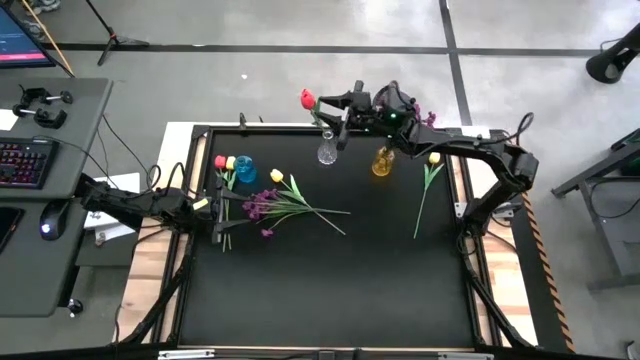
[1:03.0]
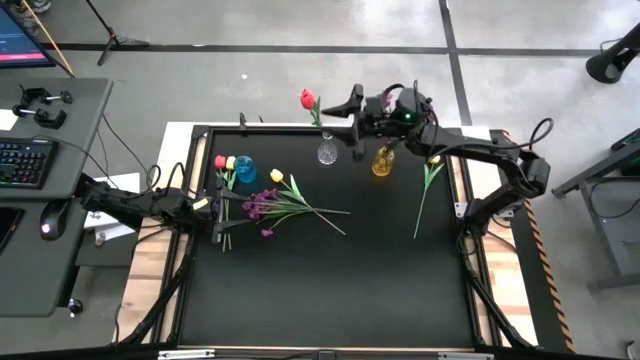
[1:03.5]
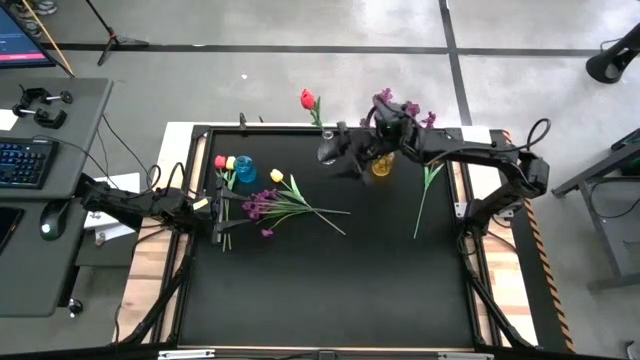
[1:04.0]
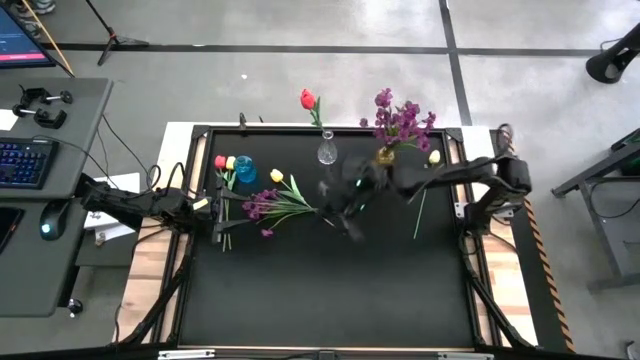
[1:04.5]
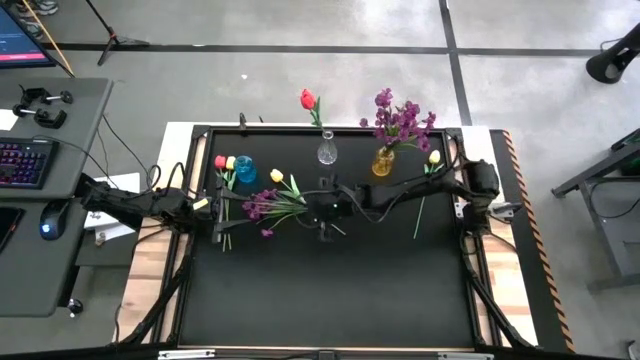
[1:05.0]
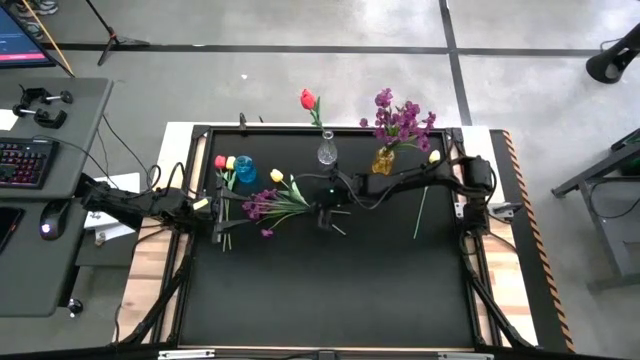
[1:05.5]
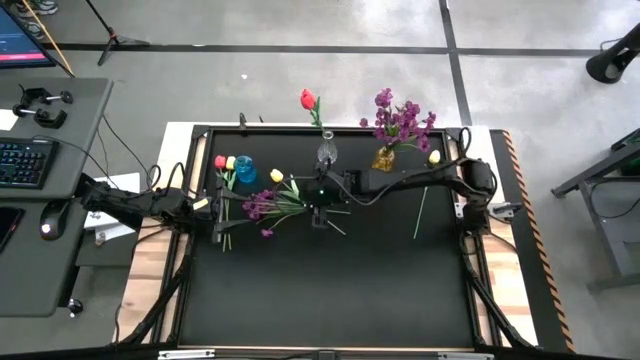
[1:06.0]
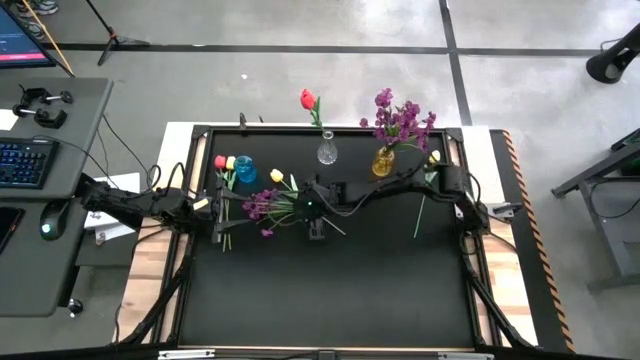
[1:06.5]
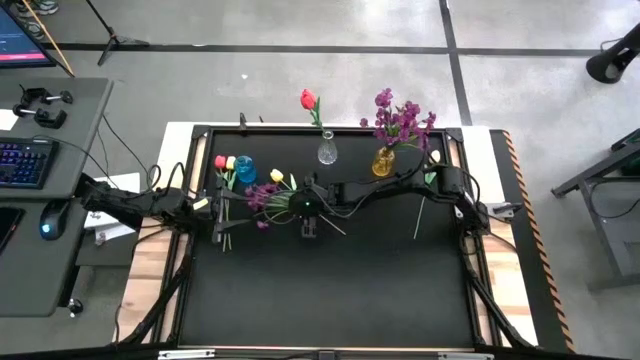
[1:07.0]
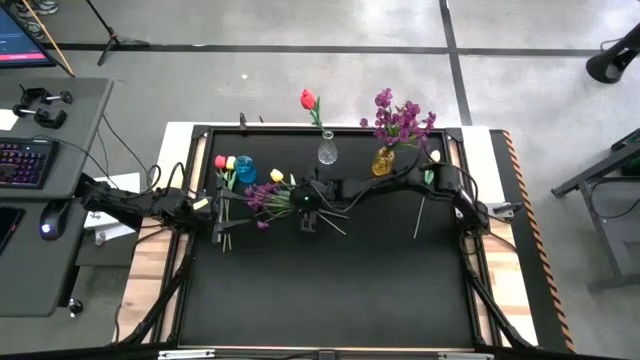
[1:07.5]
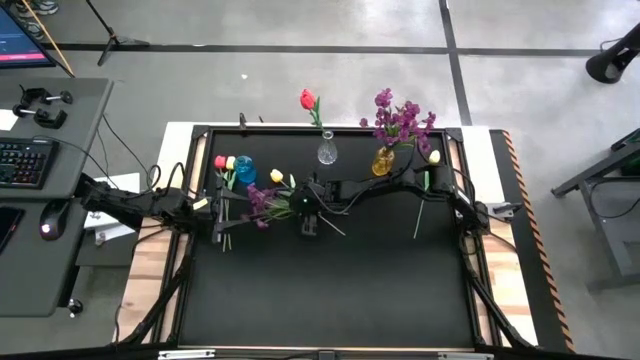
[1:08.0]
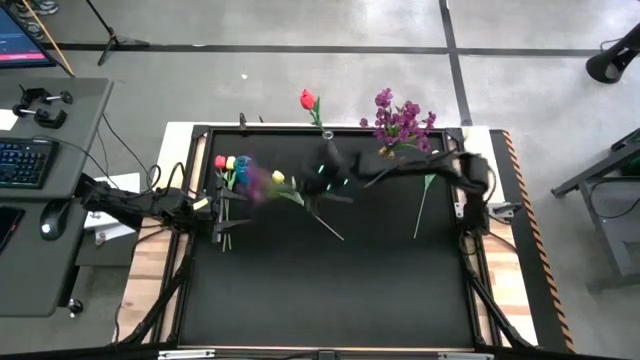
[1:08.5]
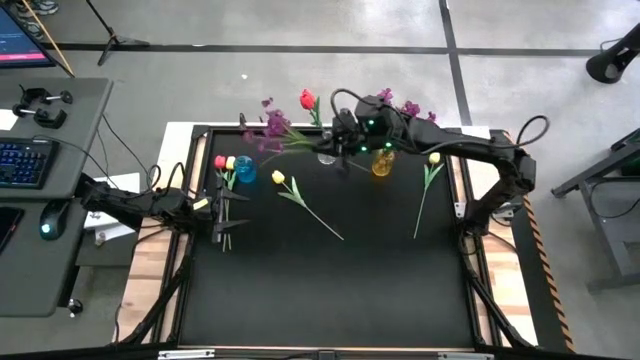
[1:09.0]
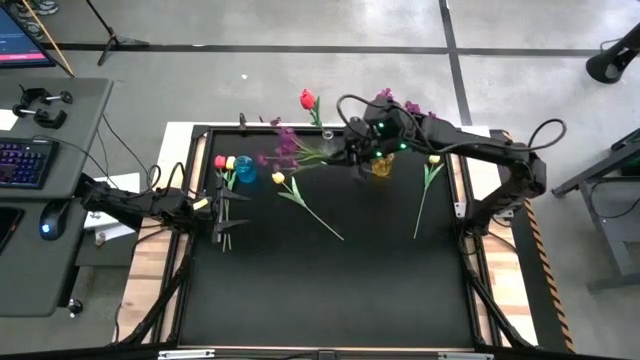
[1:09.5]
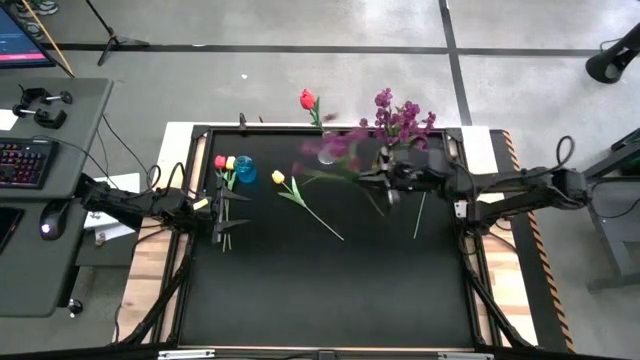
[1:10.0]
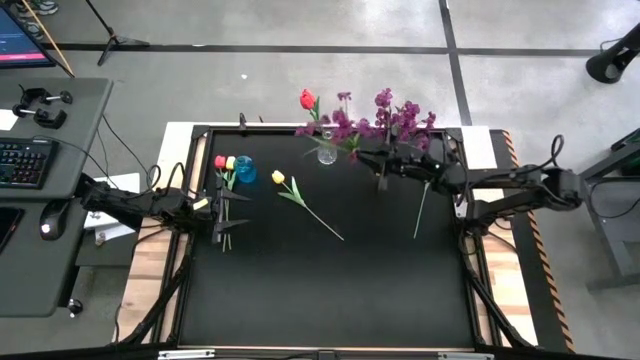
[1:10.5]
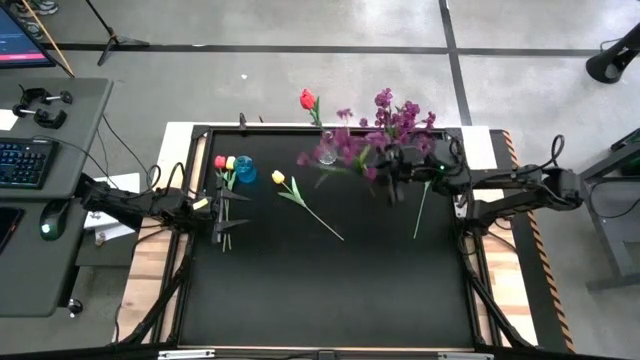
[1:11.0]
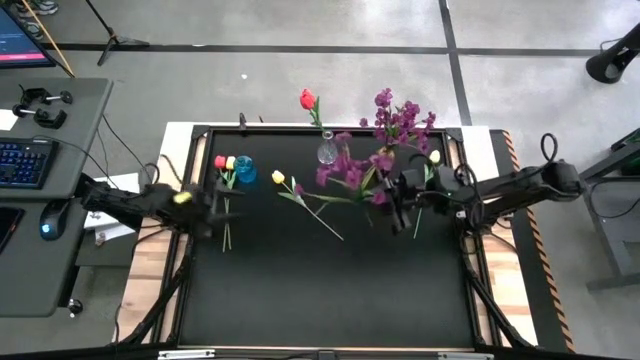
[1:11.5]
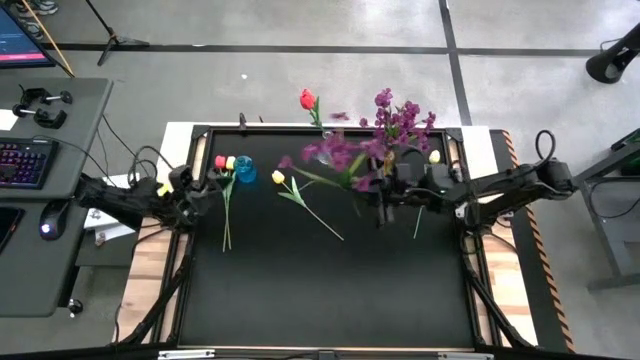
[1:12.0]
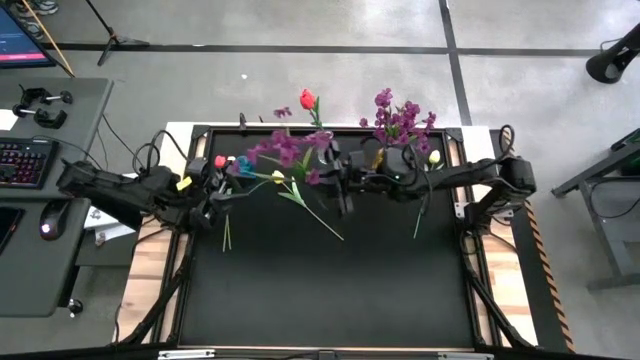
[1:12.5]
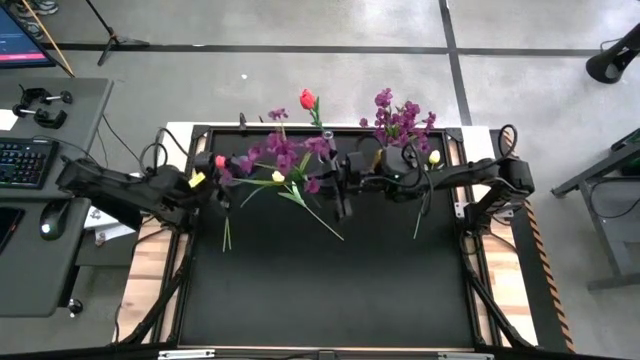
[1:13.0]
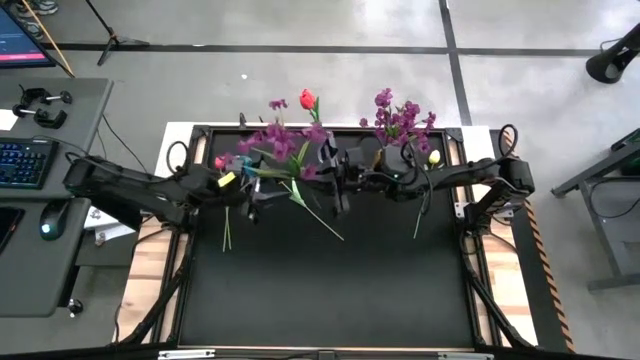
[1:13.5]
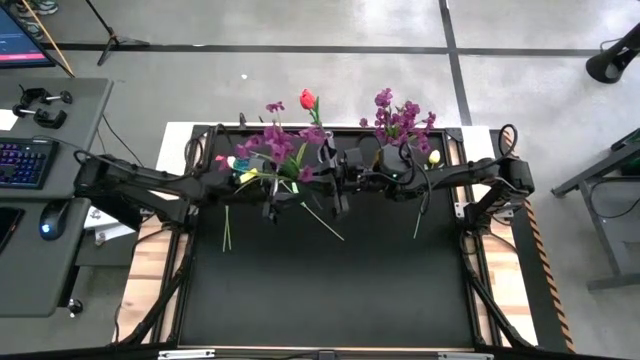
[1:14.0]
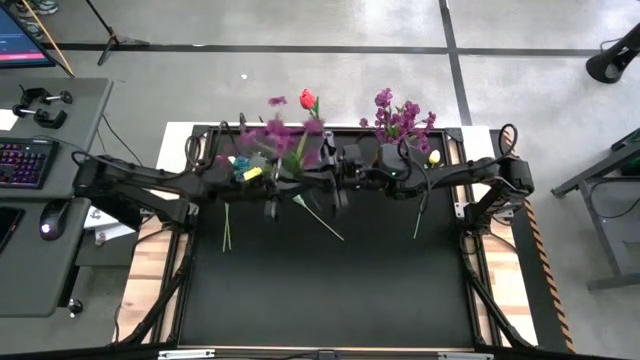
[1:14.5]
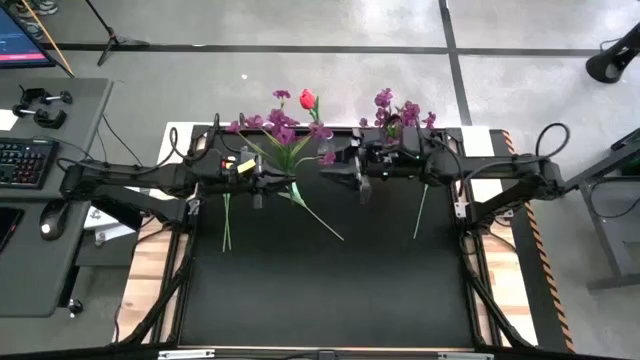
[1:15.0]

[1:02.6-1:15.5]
Task: Sort flowers into vase by color
Put the purple flower into the yellow vase

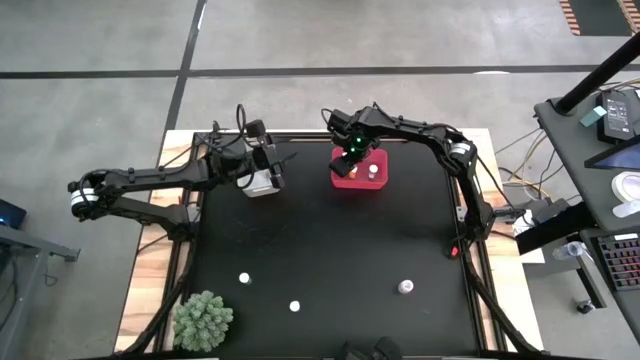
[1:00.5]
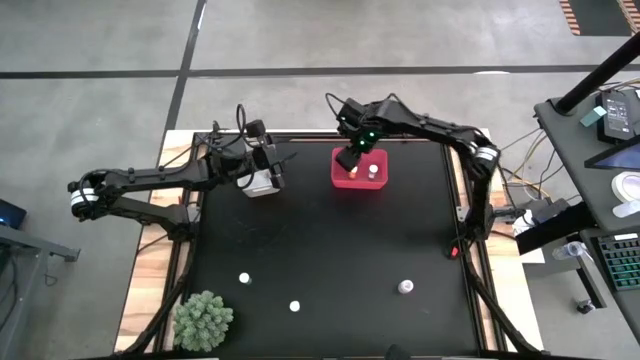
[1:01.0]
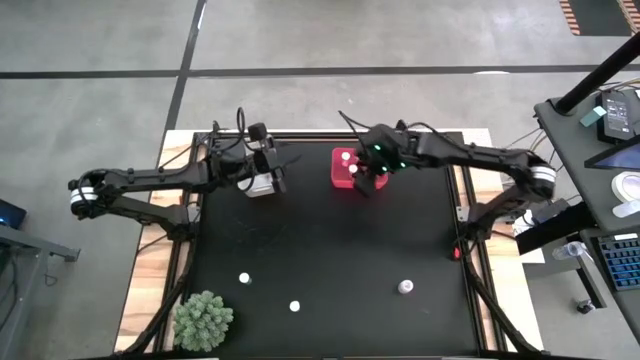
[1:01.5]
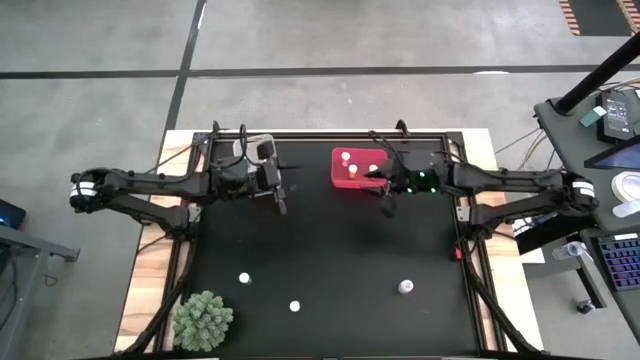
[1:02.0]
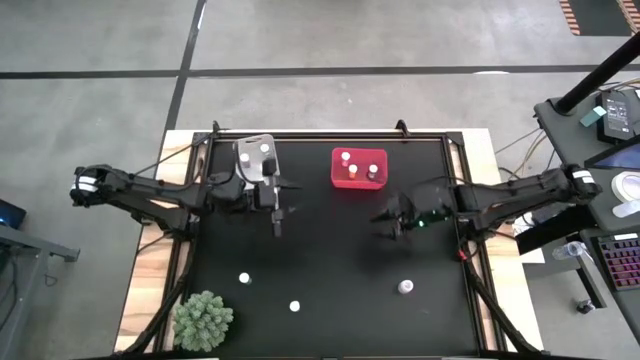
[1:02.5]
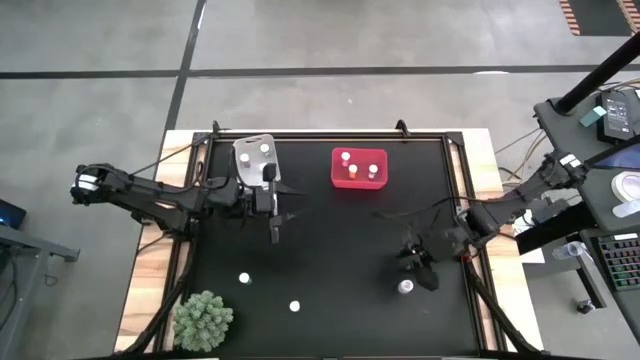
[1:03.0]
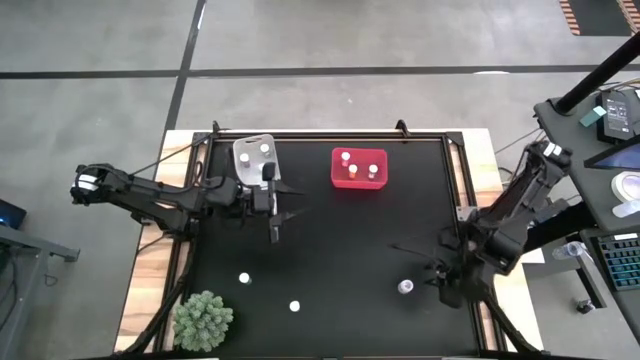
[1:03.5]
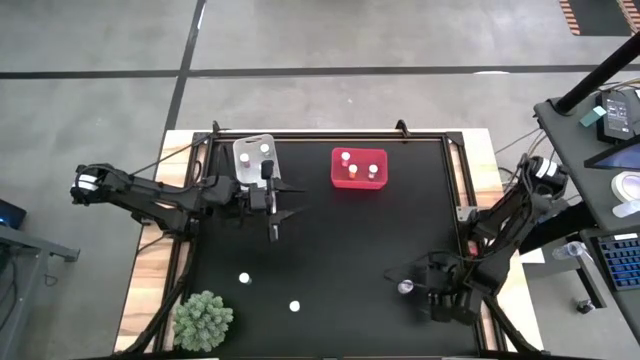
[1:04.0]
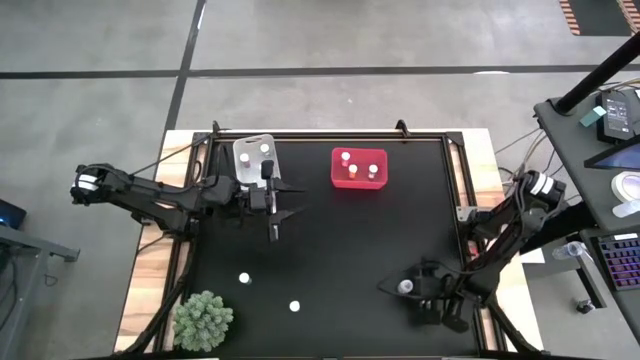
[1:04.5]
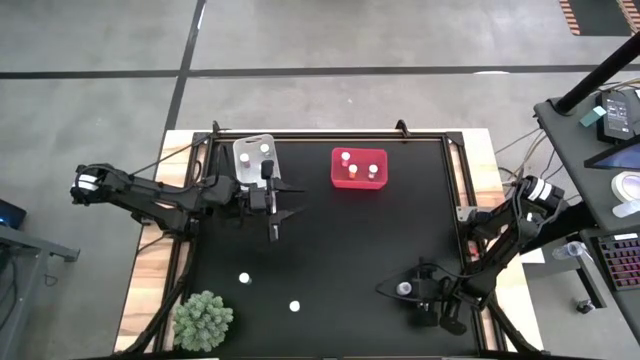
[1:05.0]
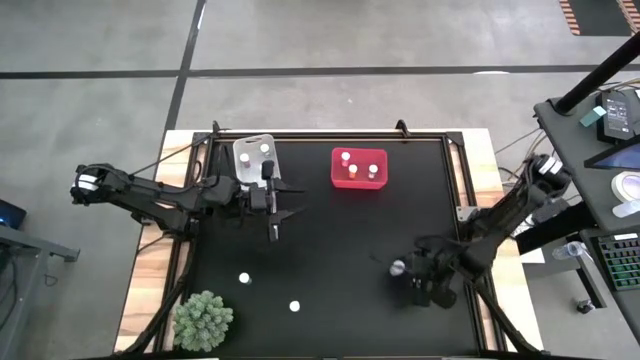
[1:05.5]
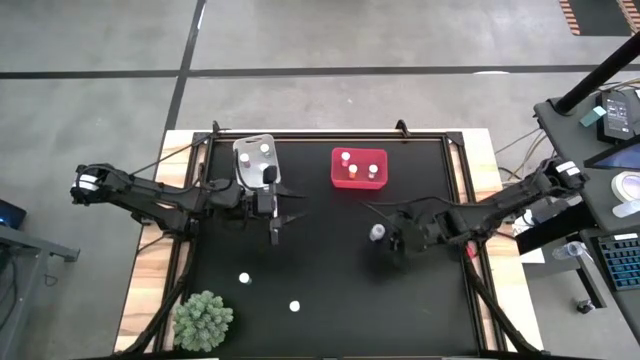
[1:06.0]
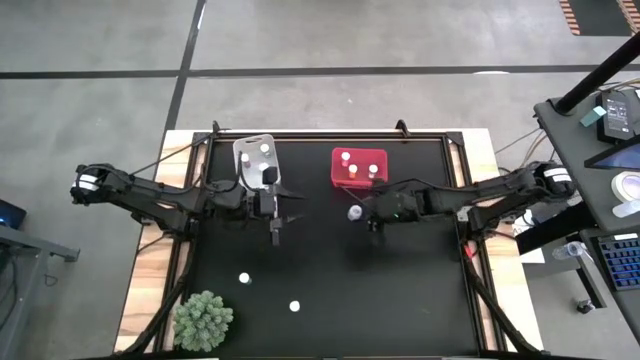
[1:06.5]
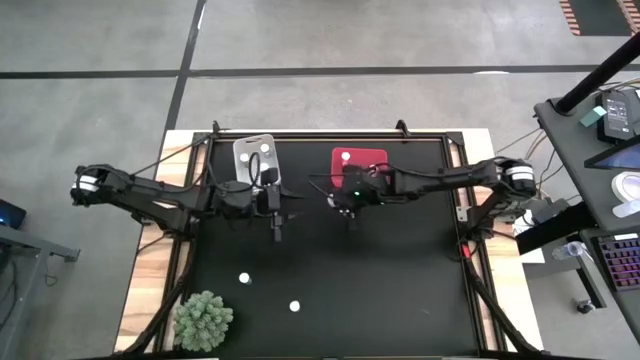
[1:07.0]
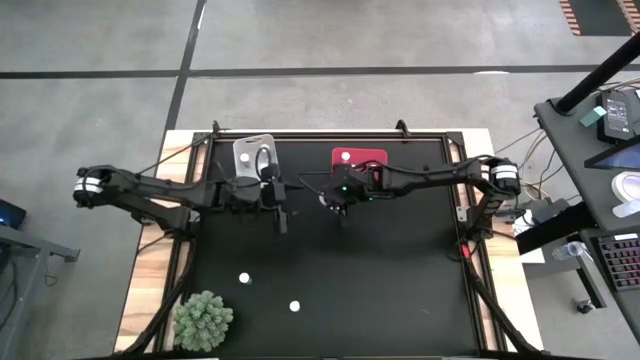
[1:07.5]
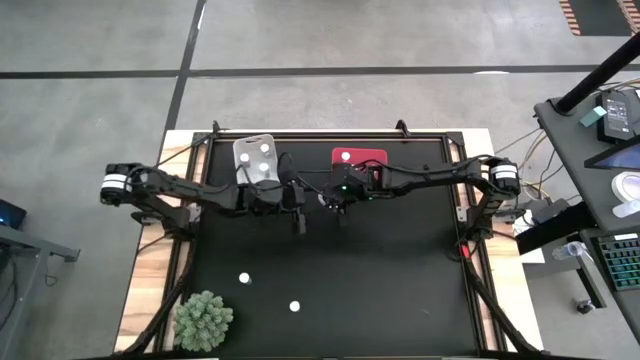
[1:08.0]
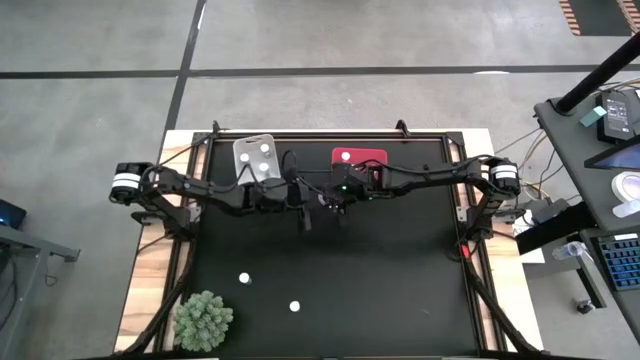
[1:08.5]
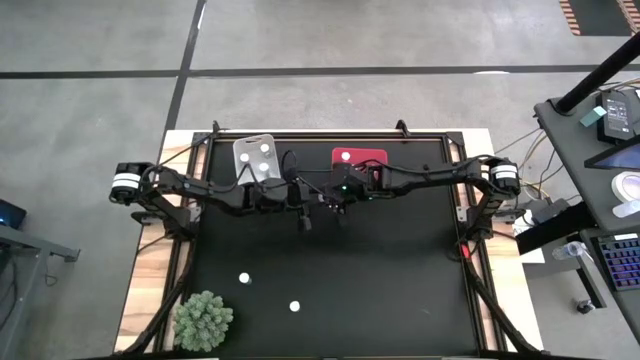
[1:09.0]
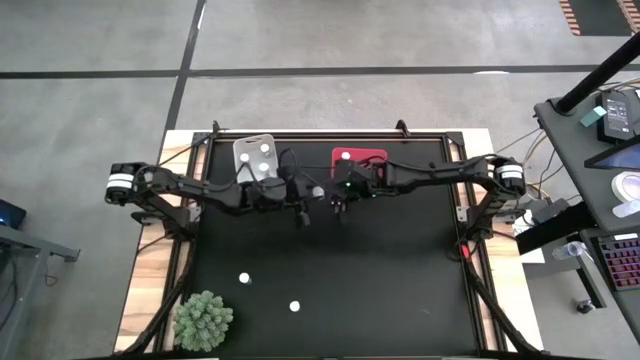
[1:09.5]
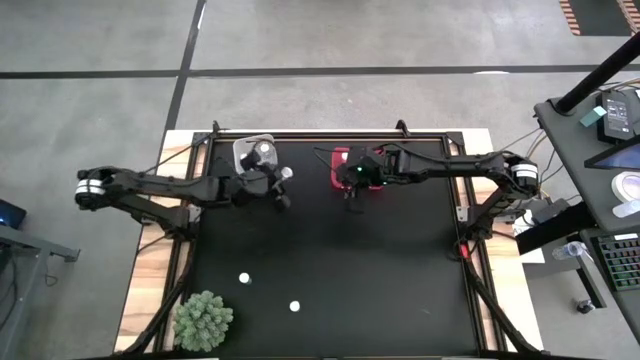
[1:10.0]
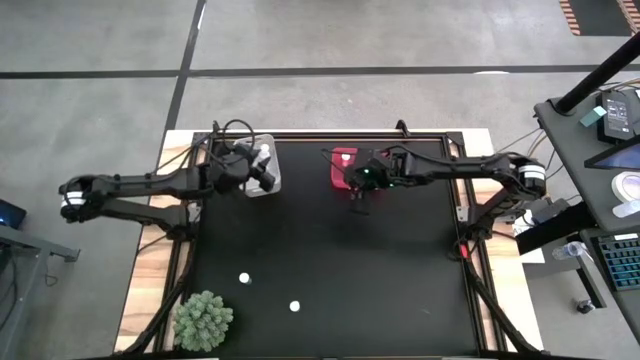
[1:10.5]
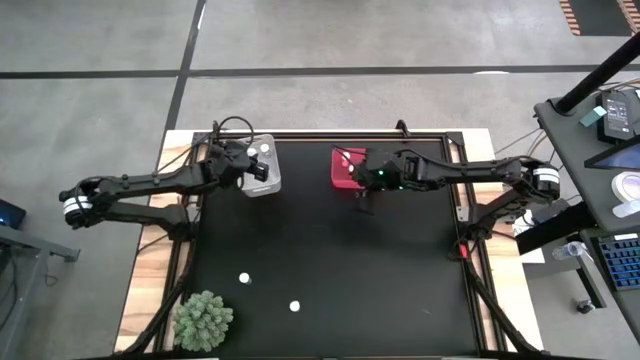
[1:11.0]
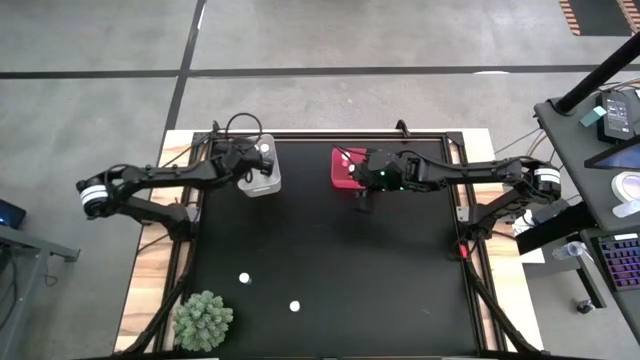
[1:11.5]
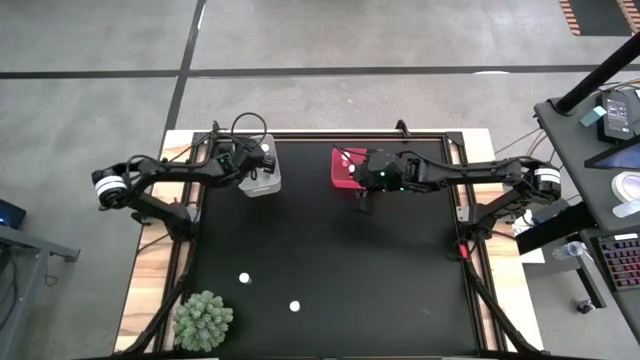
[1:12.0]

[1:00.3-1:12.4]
Task: Pick and place medicine bottles into bin by pill shape (circle, oval)
Put the white capsule bottle into the gray bin
